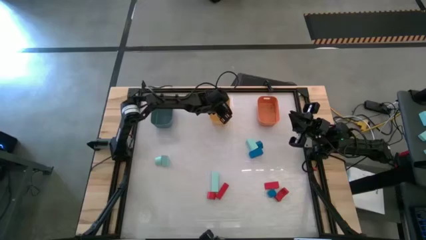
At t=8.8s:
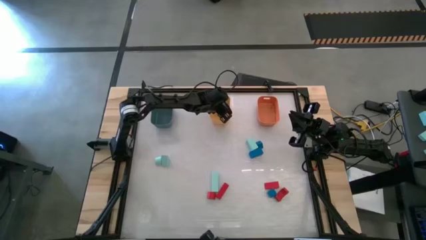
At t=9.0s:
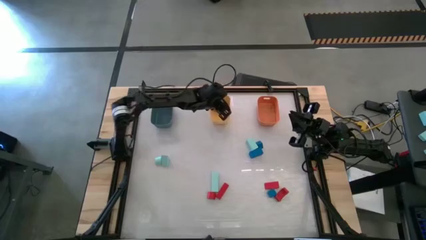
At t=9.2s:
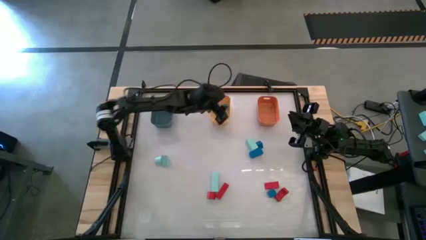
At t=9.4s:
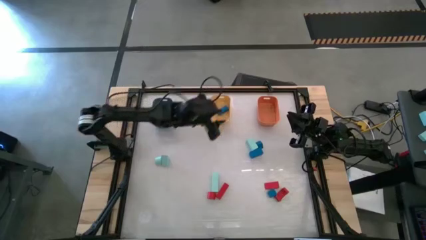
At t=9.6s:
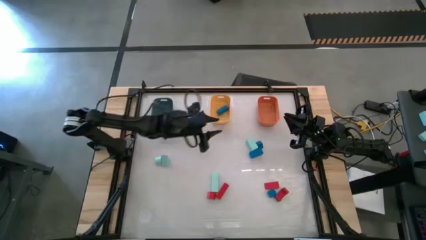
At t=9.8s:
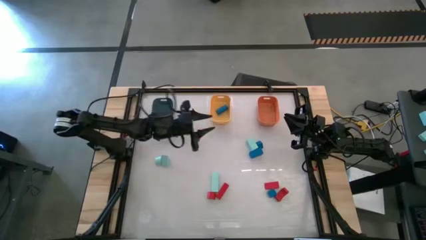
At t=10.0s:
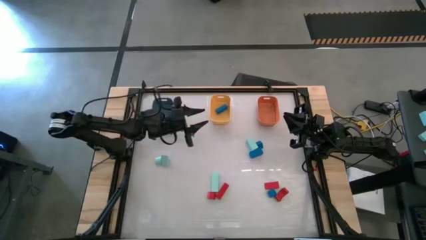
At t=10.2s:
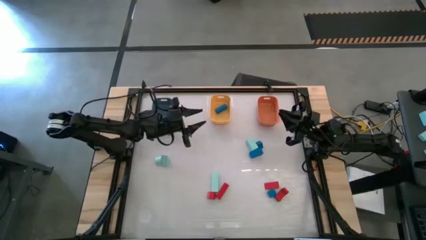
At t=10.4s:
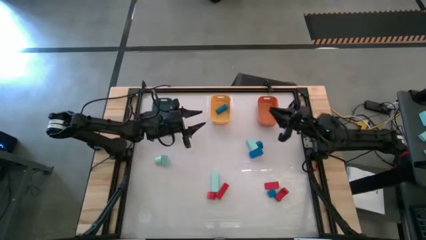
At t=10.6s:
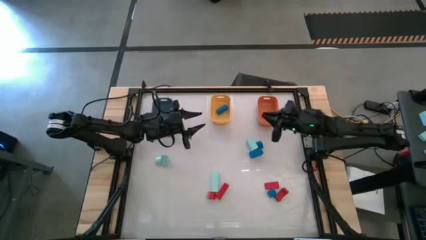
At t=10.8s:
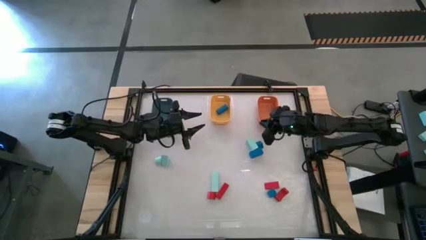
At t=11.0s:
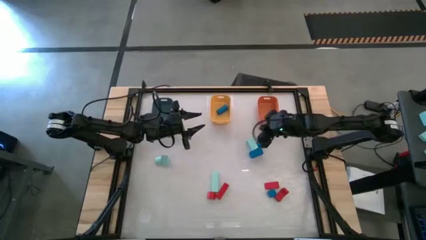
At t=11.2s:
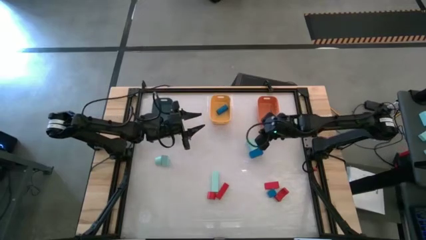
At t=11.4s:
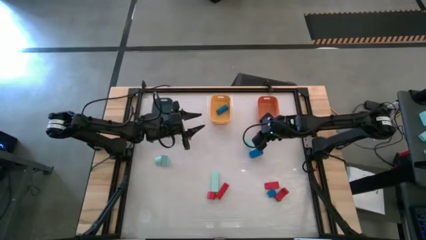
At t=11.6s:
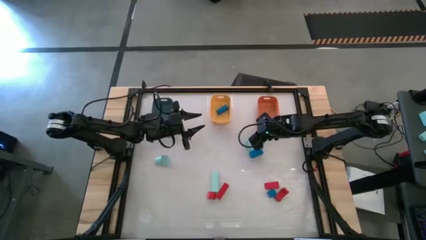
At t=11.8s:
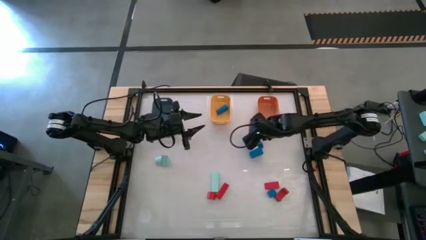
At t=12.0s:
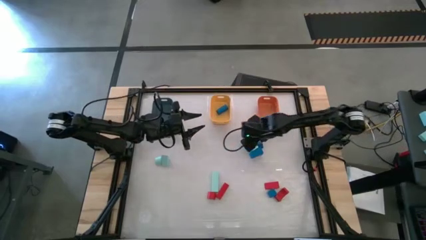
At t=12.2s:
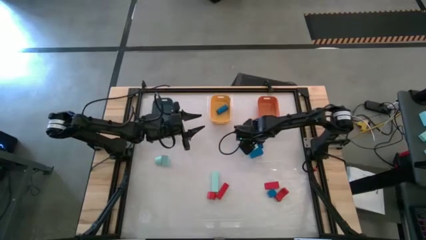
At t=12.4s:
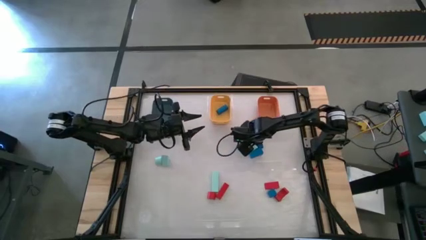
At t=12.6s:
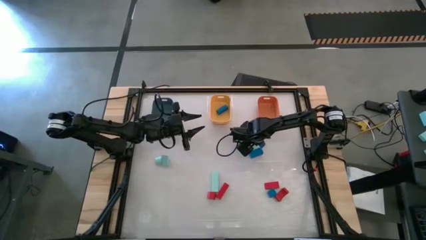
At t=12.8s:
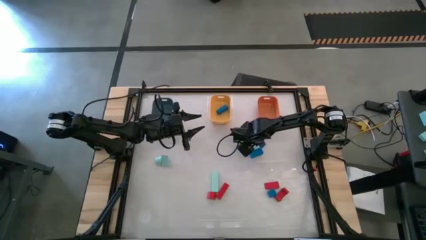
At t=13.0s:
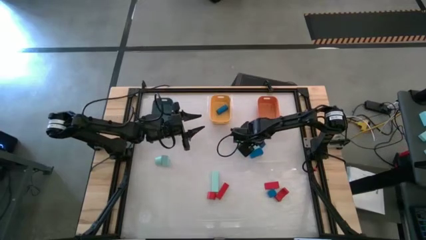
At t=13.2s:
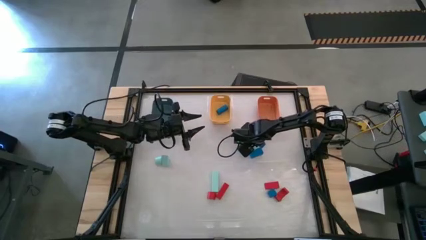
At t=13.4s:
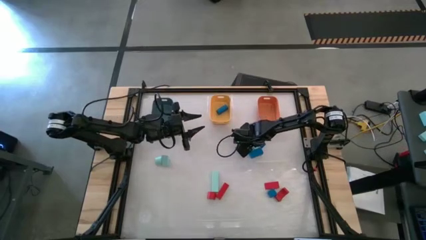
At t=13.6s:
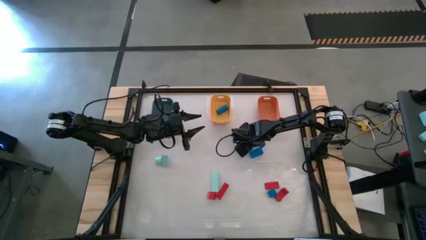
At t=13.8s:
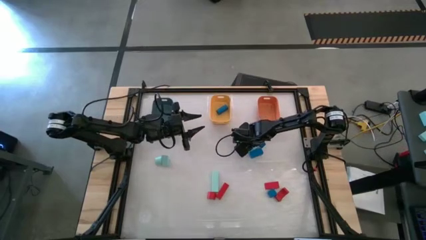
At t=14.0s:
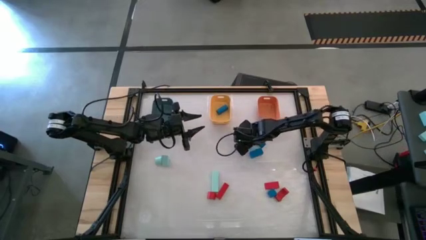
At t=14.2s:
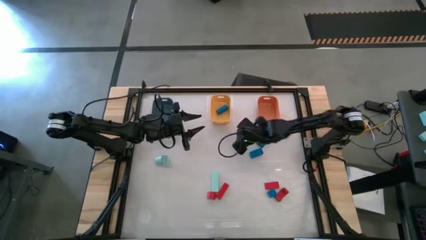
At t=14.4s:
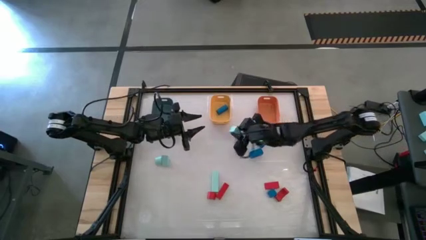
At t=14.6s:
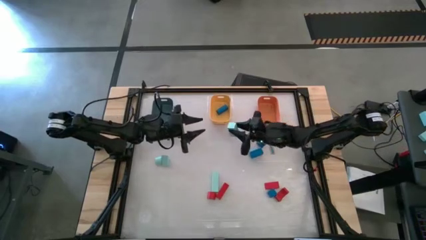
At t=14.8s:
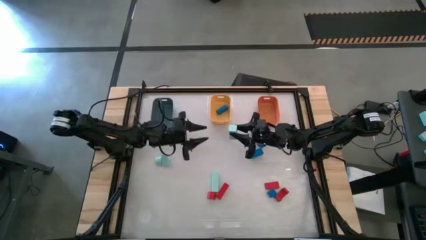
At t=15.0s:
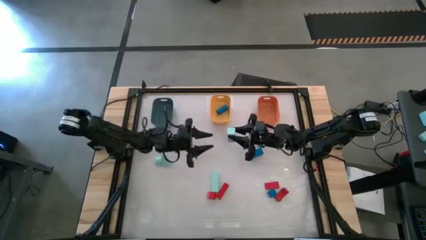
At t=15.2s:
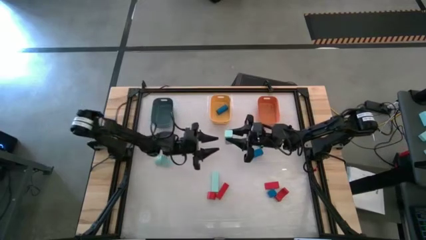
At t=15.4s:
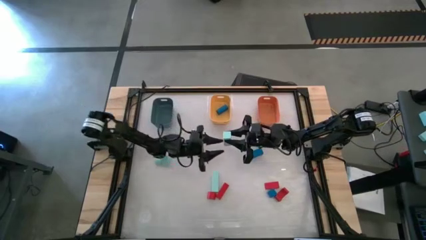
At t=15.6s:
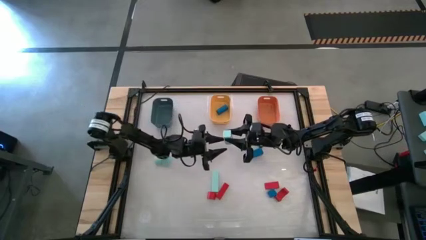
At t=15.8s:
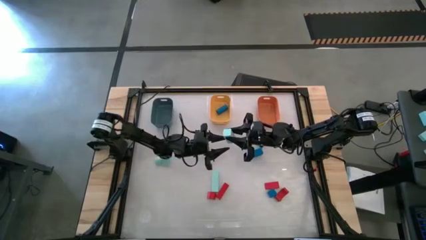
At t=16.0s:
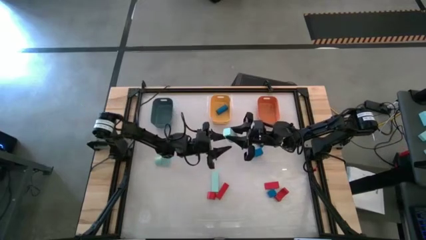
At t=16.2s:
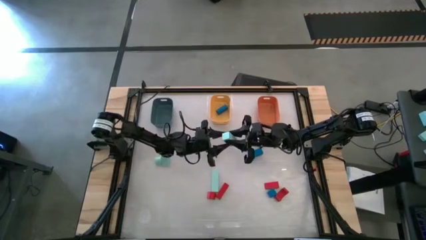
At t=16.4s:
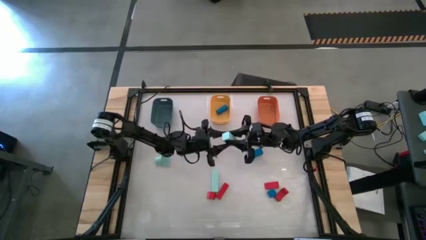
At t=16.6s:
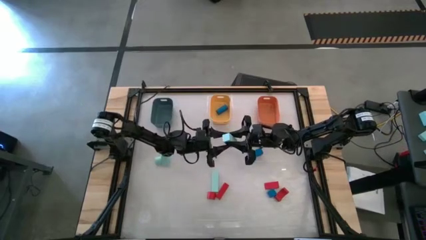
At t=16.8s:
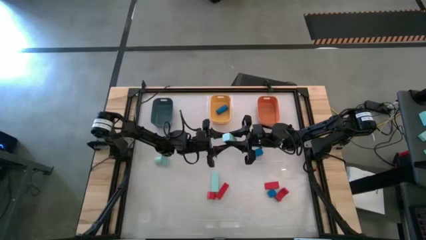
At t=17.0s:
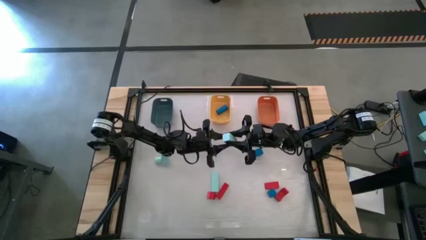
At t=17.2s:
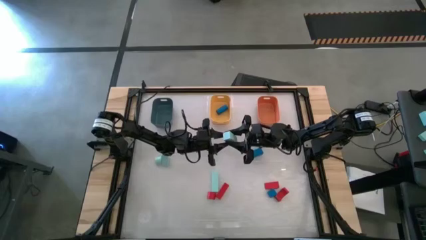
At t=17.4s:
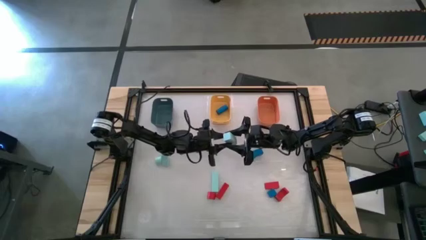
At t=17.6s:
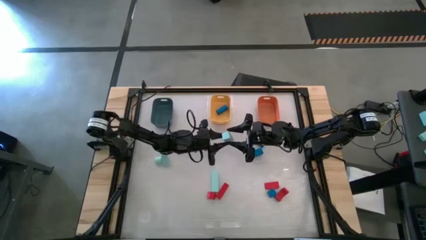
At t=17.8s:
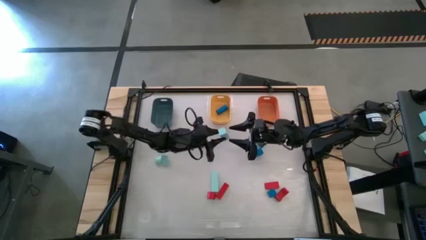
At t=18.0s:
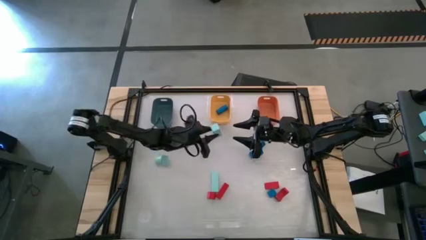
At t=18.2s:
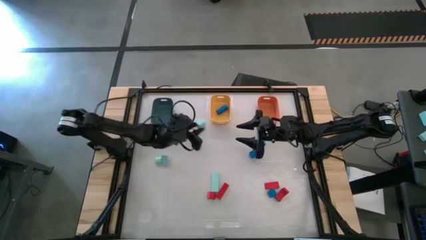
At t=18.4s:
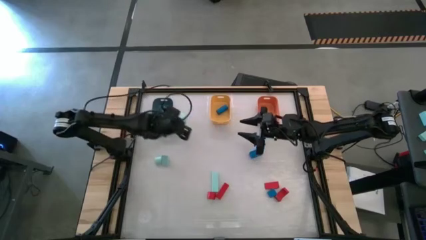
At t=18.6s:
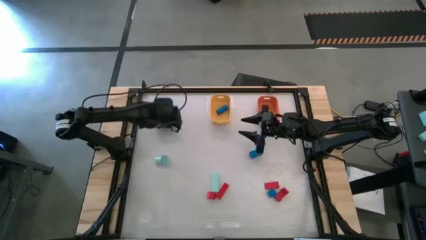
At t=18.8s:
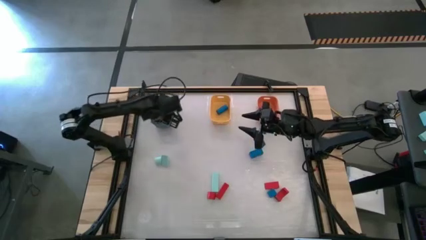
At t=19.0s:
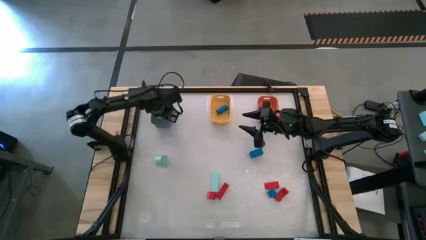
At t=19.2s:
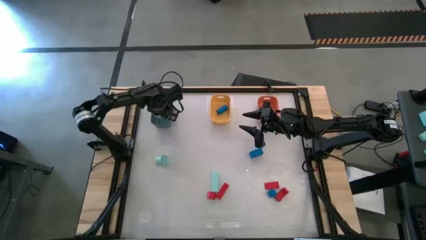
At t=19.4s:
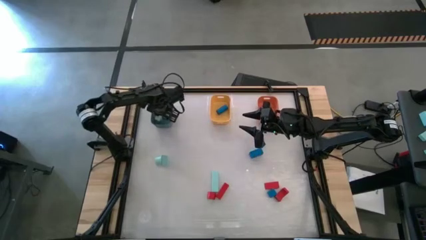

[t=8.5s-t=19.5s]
Task: Sort & place blocks by color
Put the light blue block into the green bin

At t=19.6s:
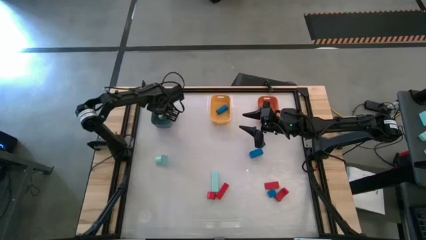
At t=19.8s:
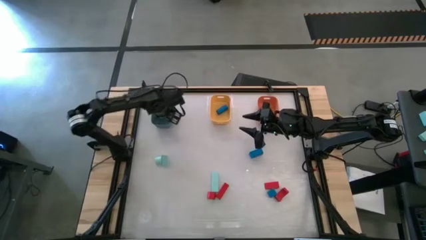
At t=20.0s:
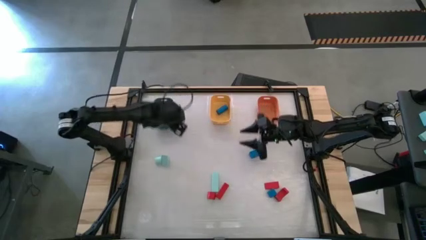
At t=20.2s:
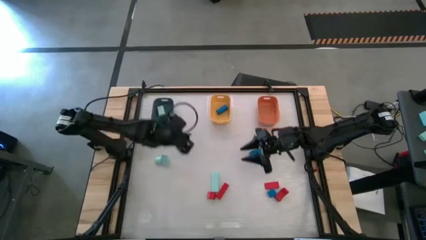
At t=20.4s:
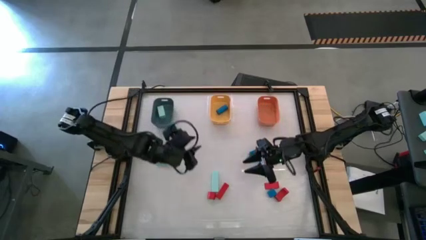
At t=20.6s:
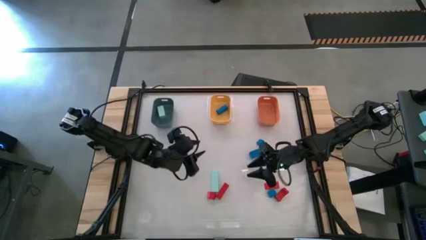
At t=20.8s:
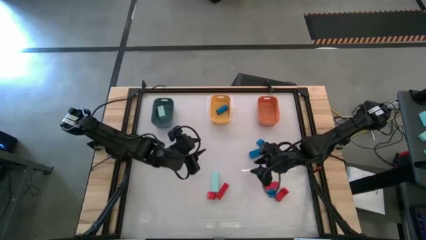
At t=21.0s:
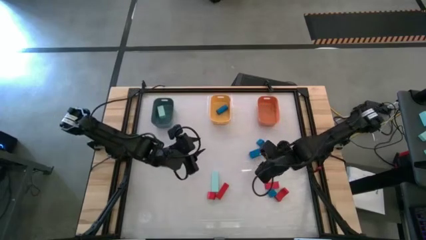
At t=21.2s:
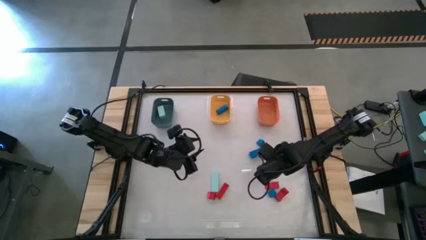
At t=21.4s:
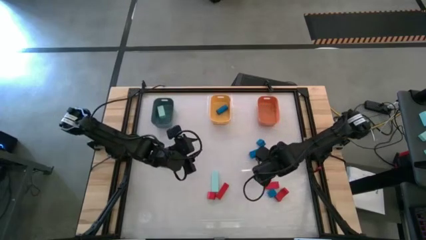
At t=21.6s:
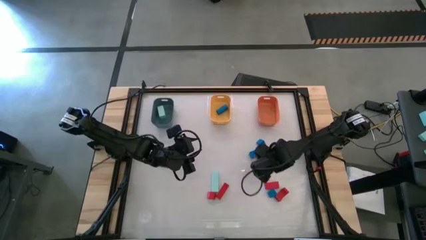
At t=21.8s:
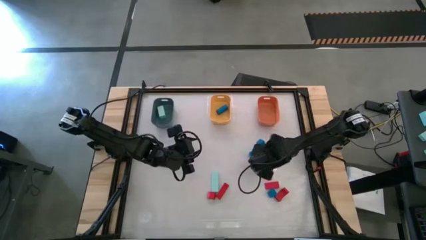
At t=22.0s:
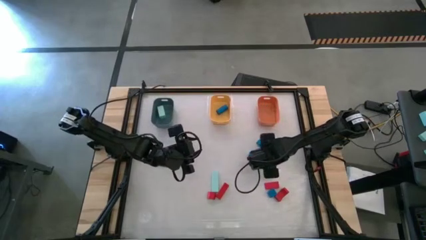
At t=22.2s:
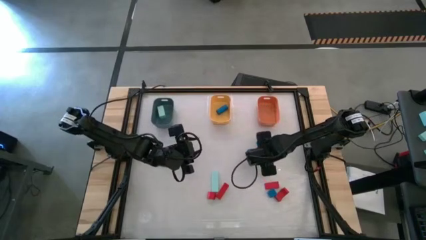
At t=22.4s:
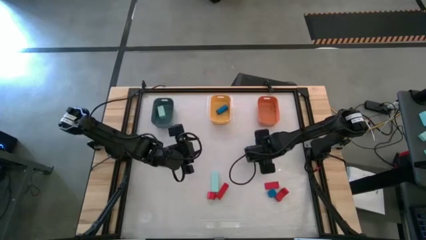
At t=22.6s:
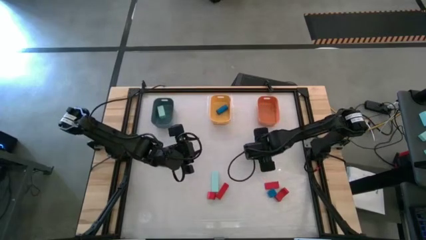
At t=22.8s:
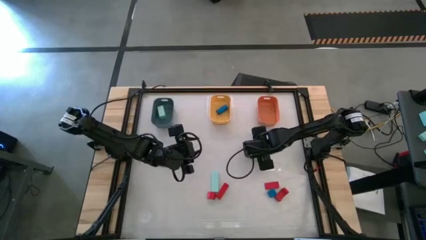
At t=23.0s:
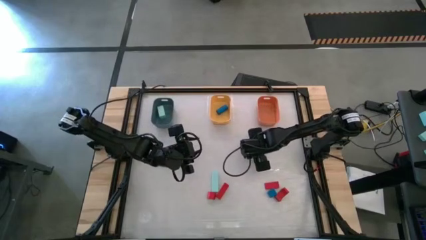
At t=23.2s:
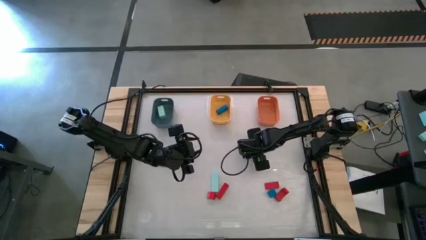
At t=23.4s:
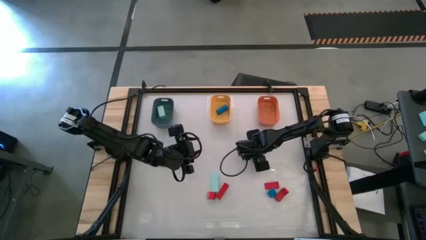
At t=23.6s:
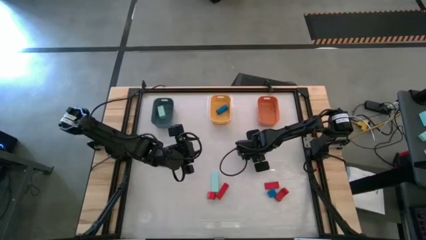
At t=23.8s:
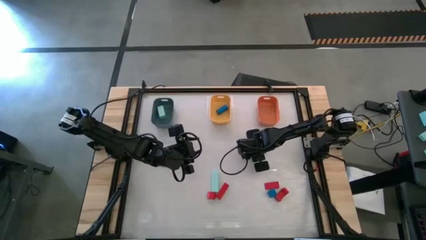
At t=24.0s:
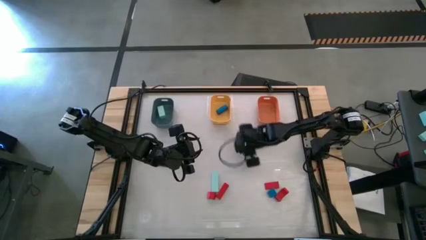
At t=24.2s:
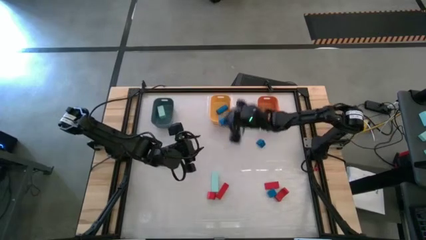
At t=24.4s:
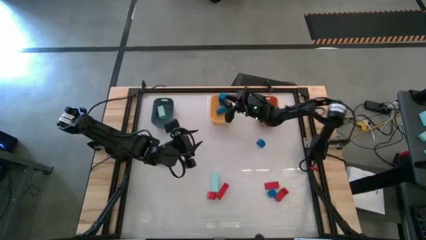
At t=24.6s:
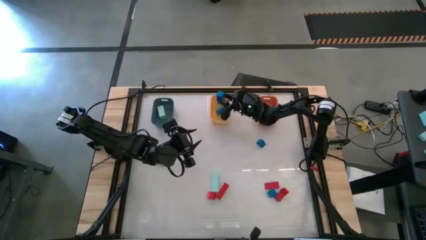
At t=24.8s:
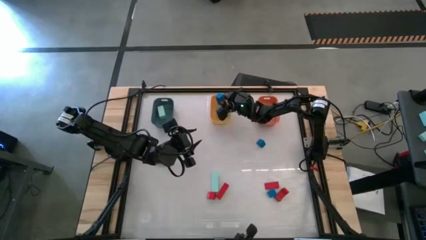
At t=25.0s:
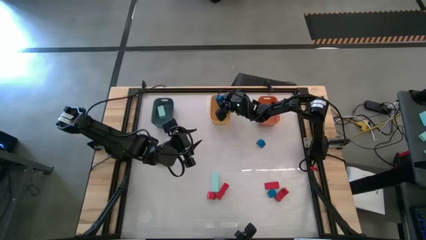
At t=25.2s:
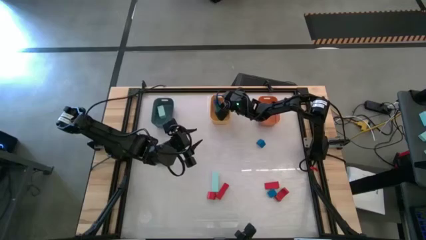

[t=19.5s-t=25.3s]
Put the blue block into the yellow bin
